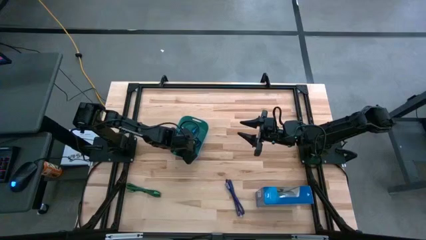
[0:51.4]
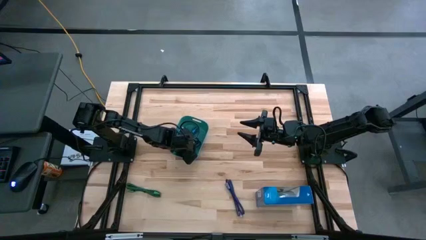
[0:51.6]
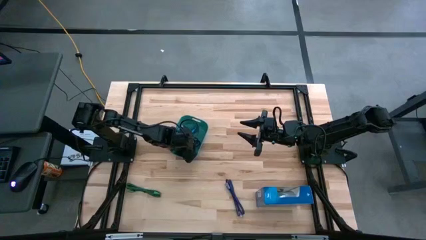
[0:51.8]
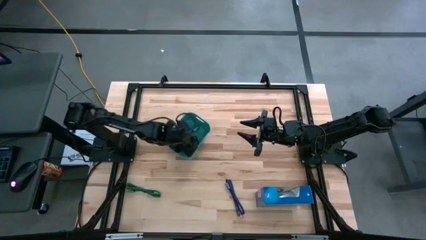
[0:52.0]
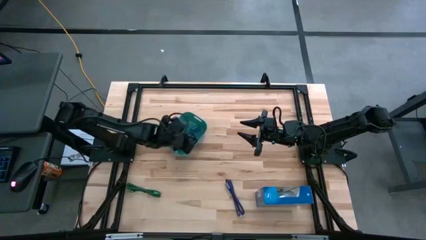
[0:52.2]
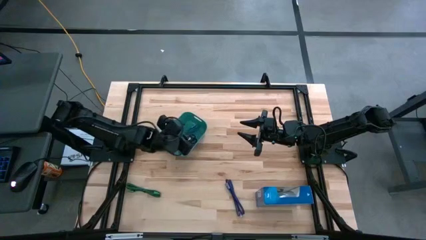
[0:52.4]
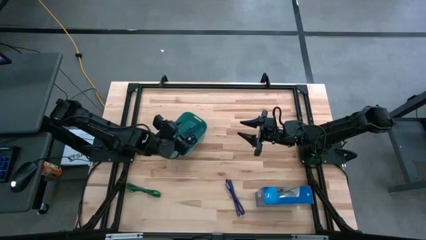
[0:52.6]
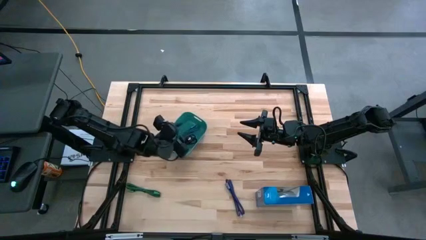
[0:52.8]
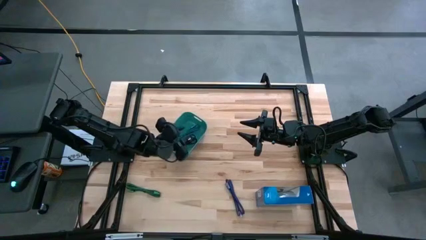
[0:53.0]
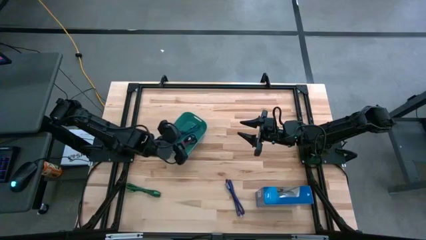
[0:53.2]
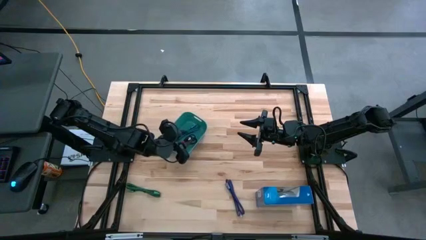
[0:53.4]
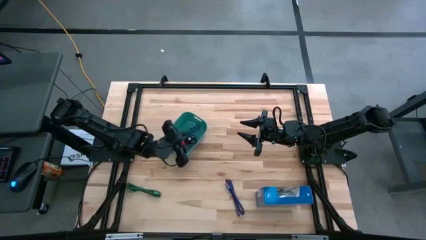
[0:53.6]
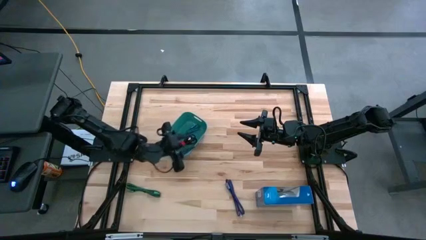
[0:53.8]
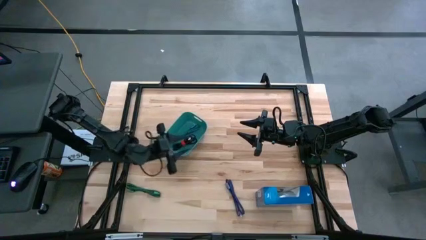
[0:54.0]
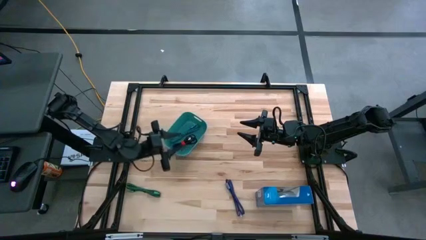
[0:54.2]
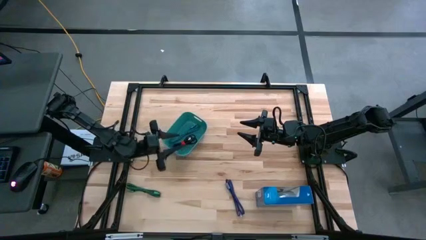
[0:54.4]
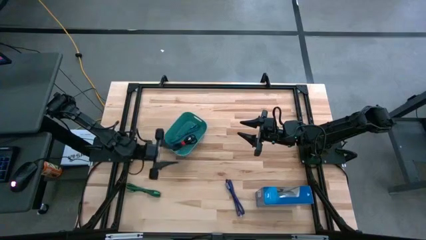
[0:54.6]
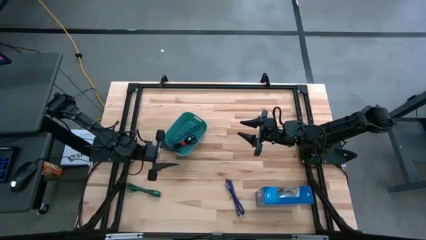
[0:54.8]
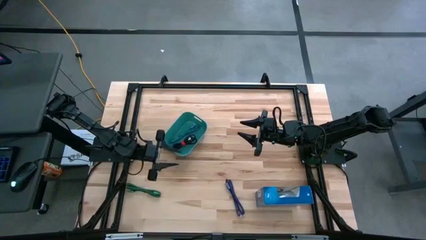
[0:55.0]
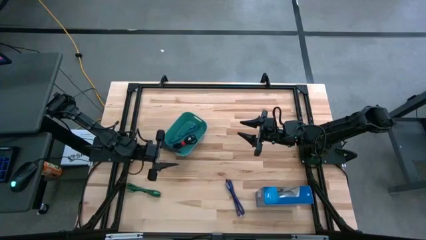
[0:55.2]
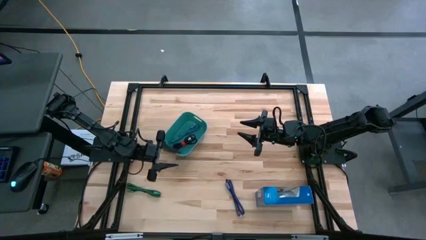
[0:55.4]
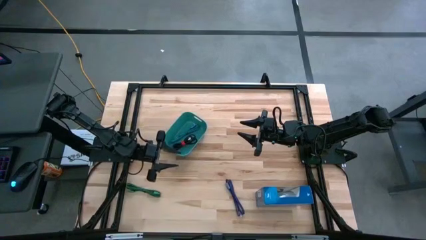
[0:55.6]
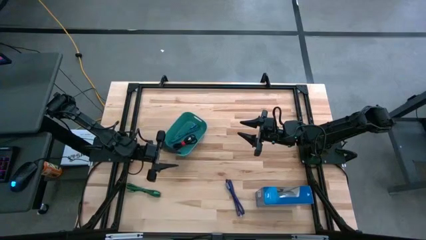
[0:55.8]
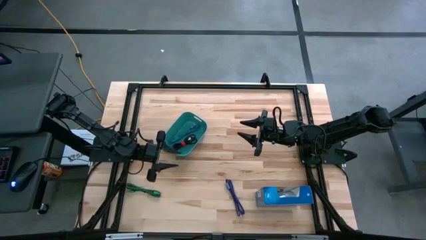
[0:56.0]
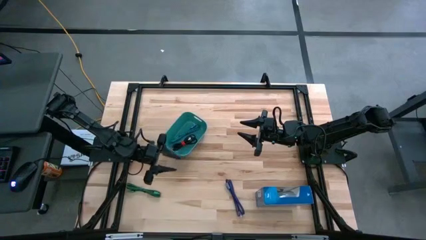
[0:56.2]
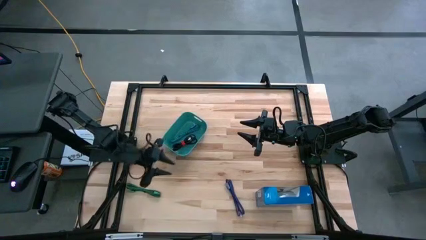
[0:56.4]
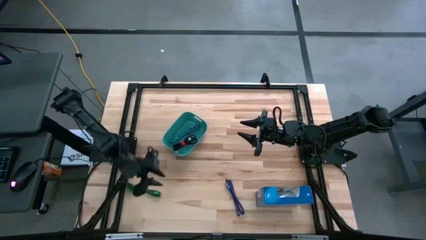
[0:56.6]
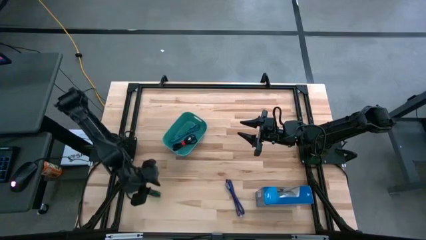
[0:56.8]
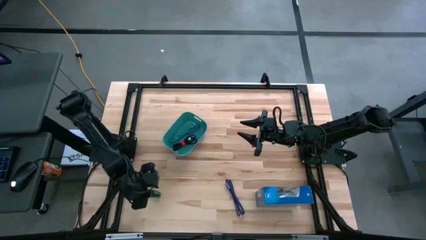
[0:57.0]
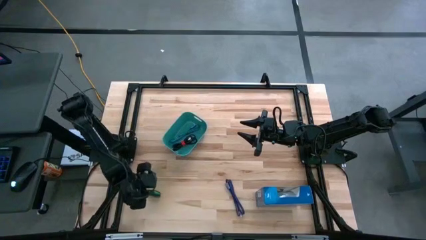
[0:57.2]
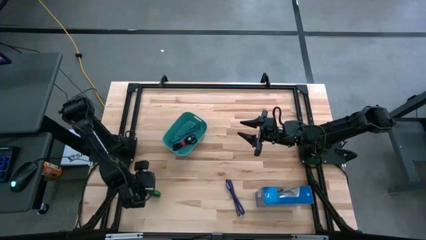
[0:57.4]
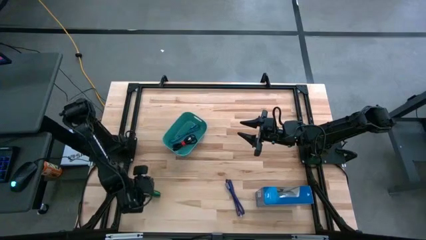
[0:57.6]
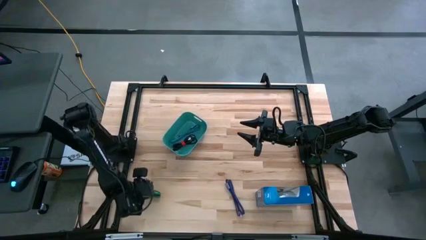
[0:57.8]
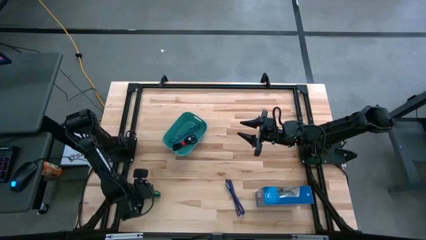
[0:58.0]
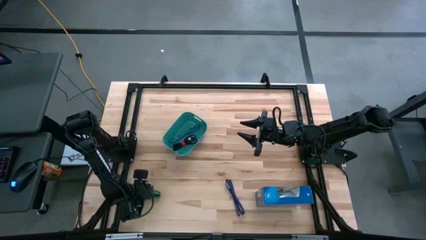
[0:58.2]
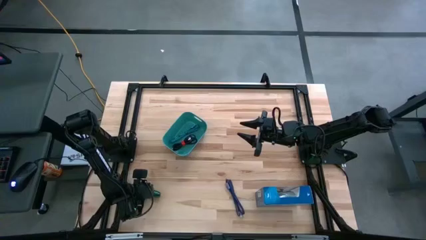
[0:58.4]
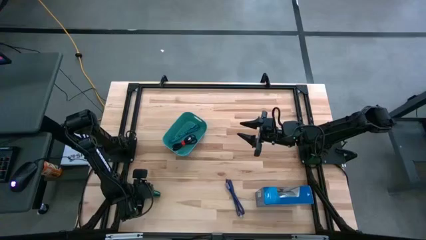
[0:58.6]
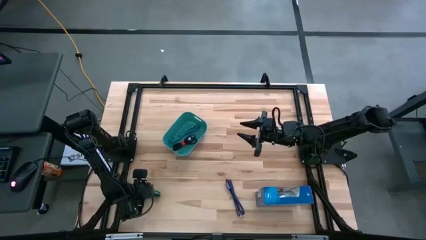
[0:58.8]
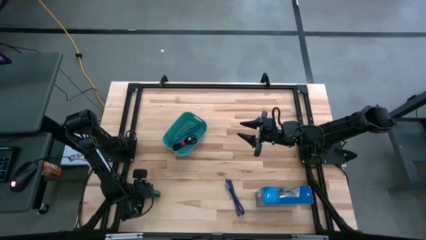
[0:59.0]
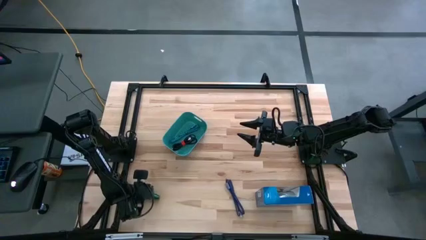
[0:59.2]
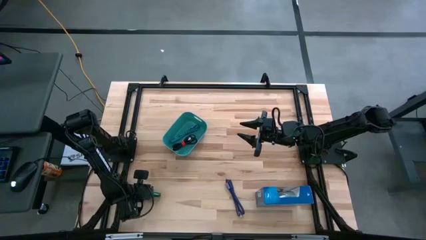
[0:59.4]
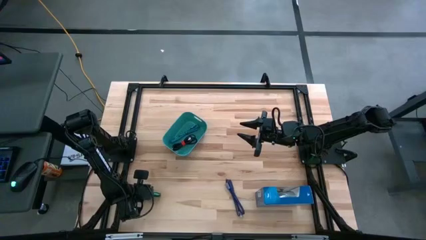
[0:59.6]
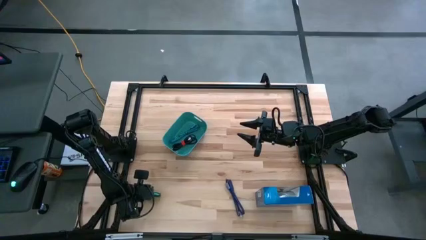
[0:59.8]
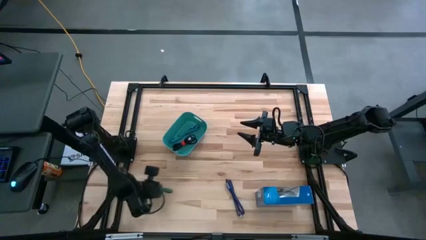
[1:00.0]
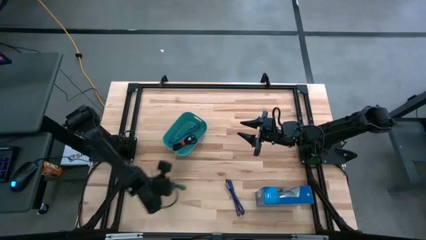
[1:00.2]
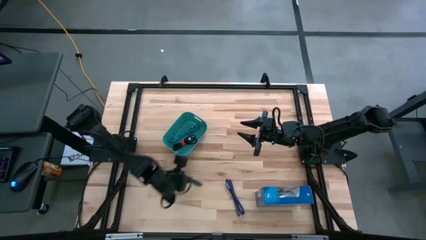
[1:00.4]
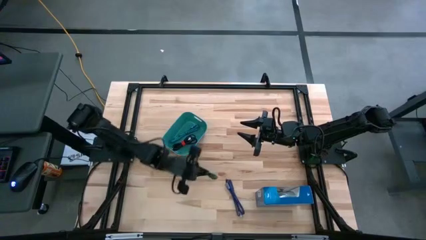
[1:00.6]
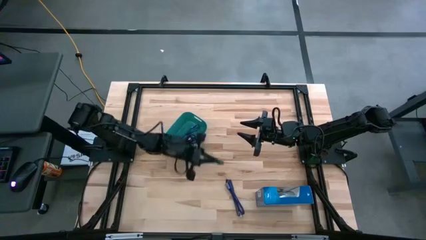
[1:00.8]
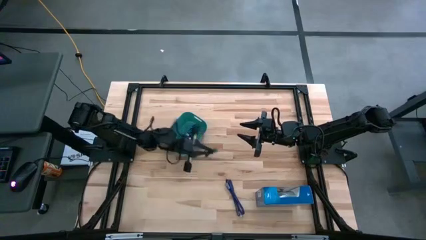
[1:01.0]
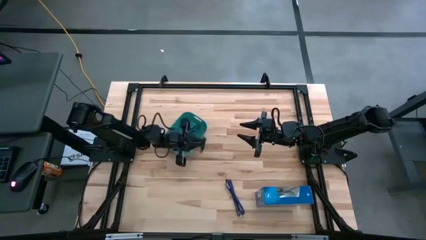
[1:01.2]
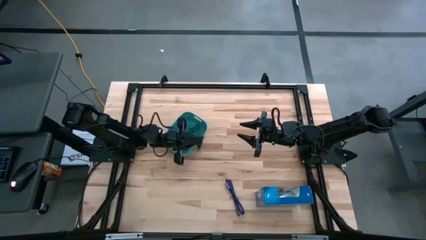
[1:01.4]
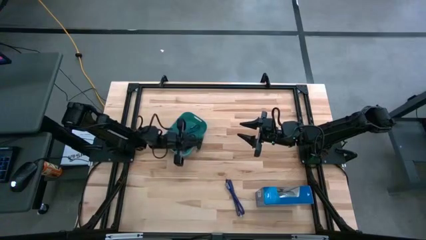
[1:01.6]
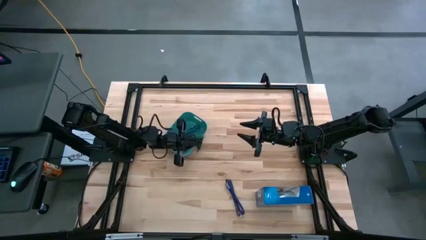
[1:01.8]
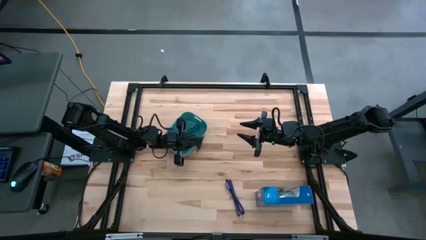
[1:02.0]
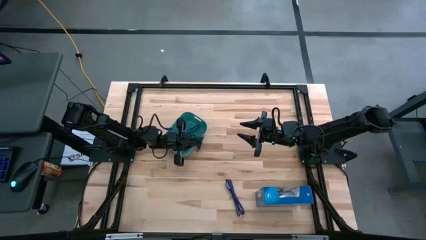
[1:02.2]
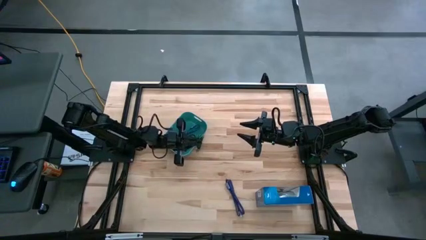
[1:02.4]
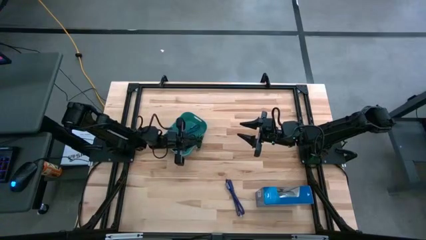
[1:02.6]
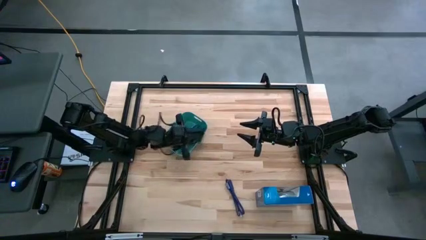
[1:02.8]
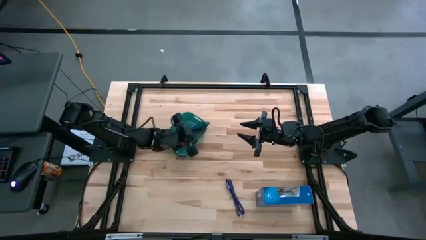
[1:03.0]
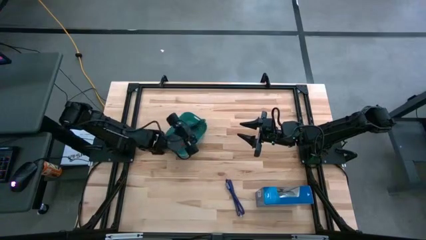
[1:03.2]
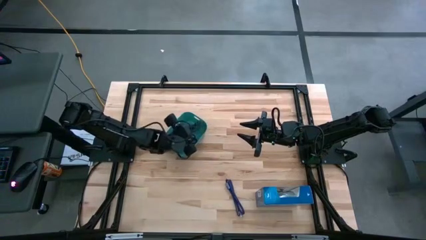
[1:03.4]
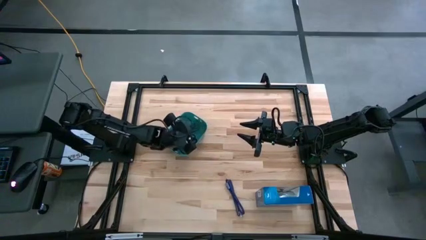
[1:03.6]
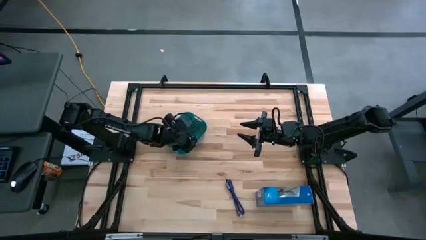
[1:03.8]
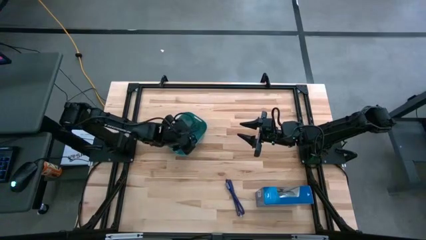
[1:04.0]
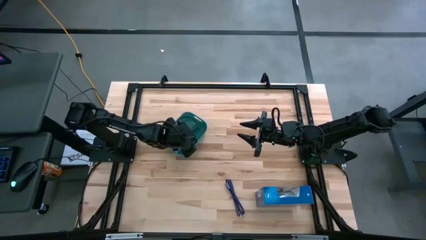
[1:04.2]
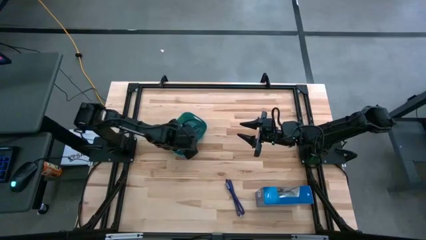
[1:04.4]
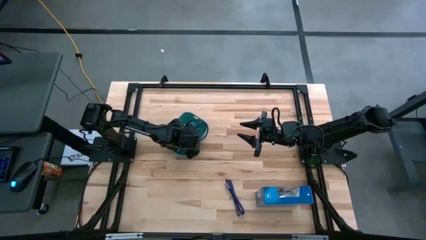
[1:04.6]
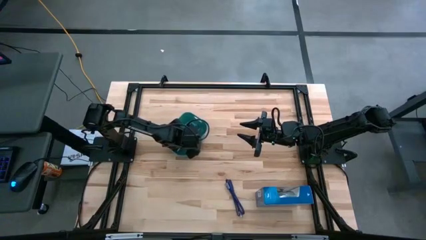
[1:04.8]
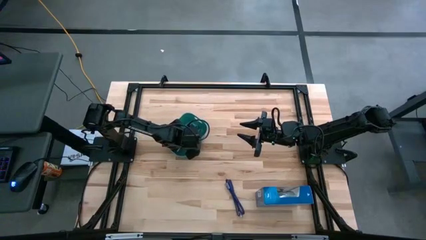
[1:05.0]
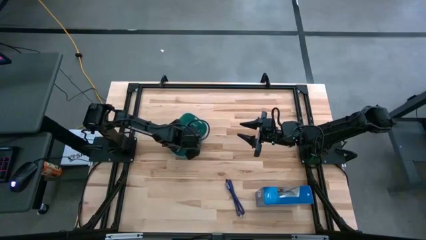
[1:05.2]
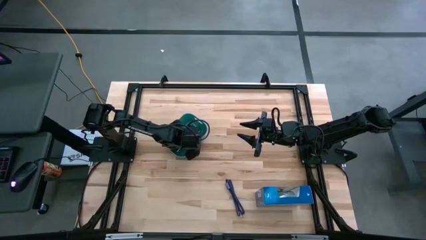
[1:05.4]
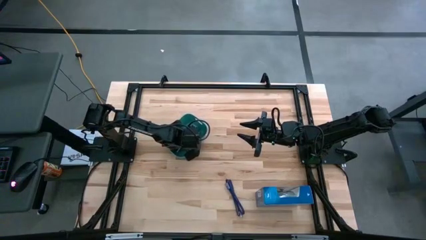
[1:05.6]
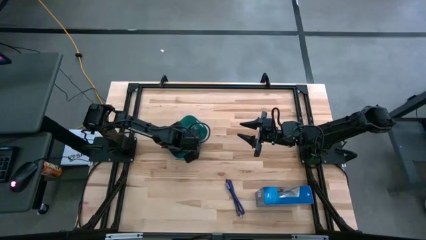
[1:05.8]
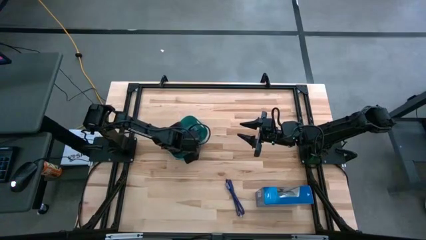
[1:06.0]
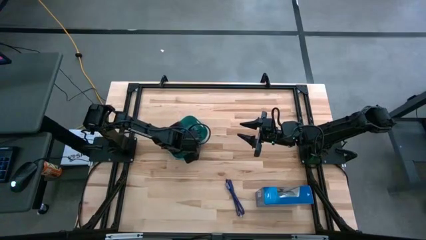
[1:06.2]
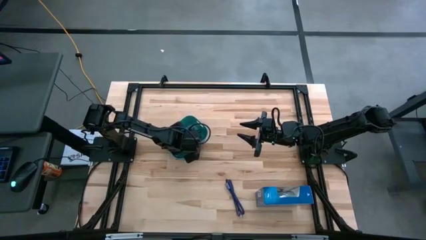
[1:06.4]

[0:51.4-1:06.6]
Task: Pick and place USB-C Cables
Put the green charger cable into the bin

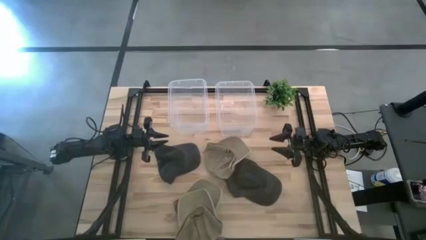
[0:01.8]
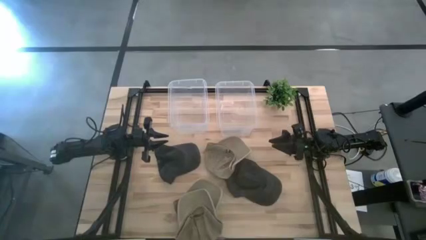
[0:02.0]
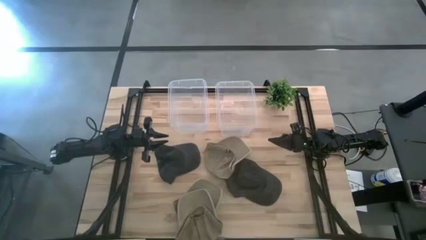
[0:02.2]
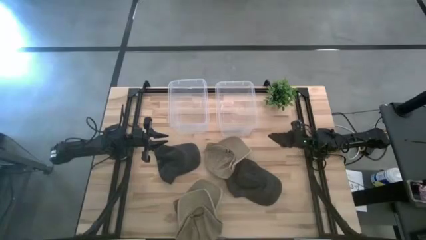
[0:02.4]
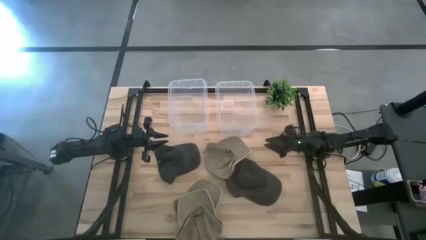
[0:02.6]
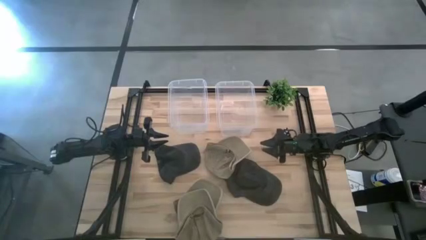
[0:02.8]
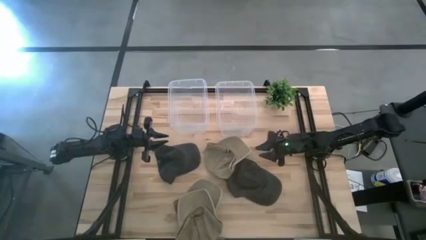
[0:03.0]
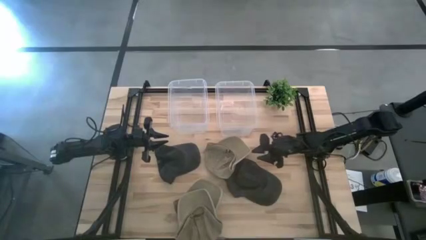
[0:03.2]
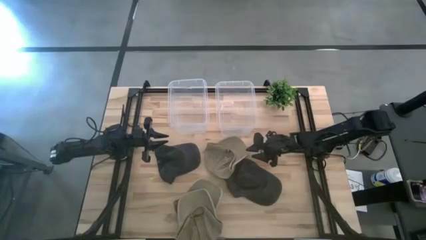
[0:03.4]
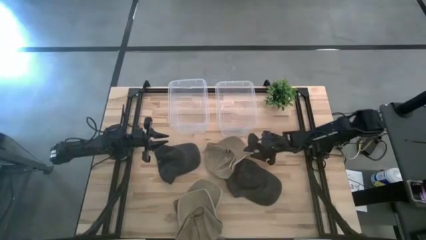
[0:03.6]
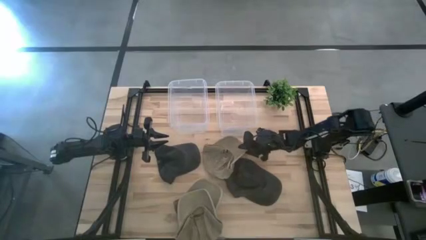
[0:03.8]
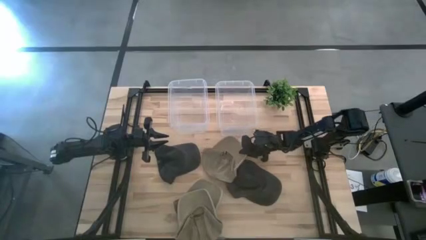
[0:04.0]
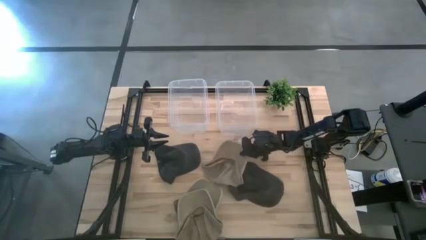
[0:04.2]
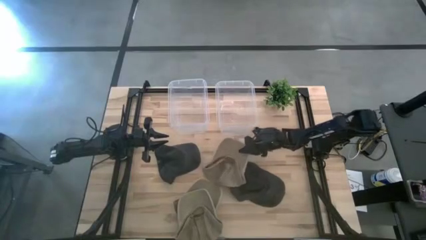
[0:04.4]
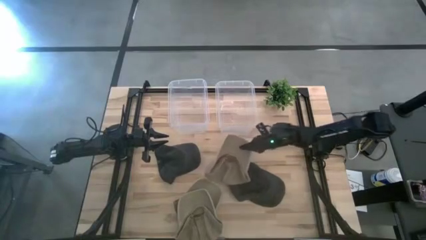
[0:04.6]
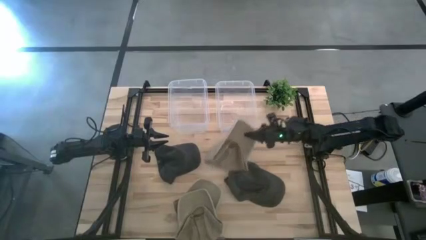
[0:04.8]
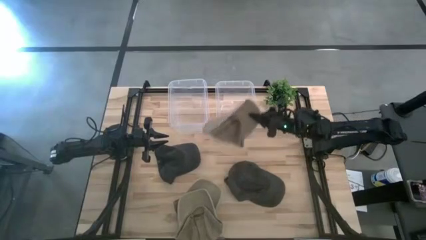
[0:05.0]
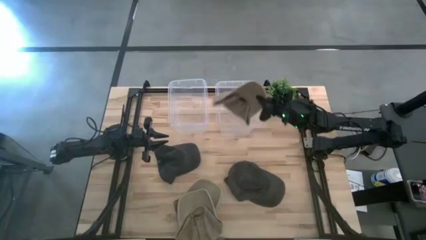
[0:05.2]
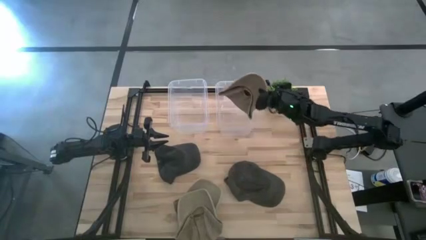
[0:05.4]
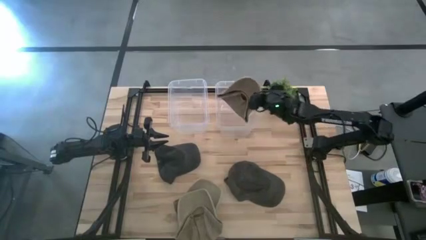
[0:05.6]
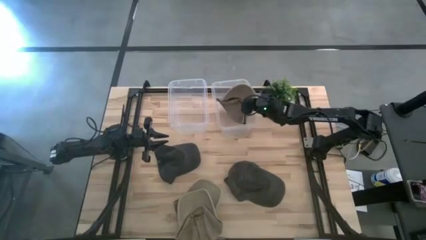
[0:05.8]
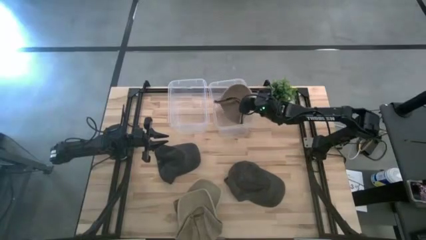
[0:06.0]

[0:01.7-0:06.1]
Task: Pick & Place hat
Put the top brown cap into the right transparent container
